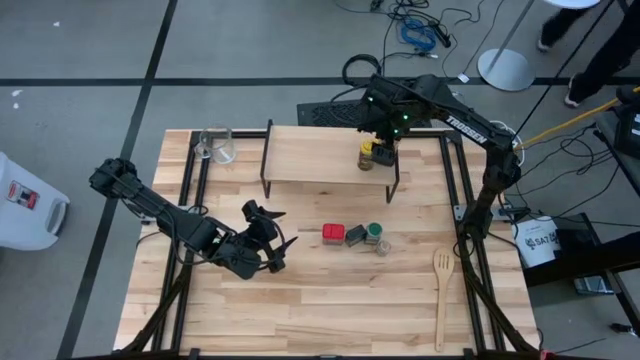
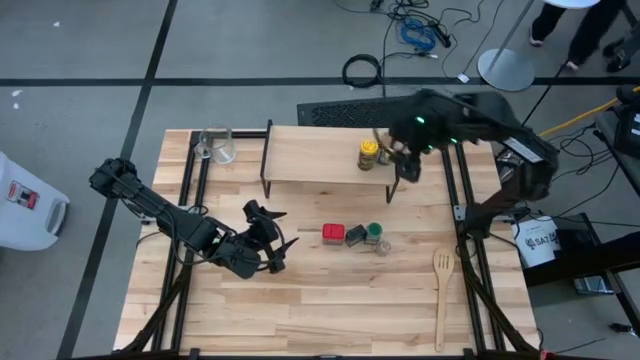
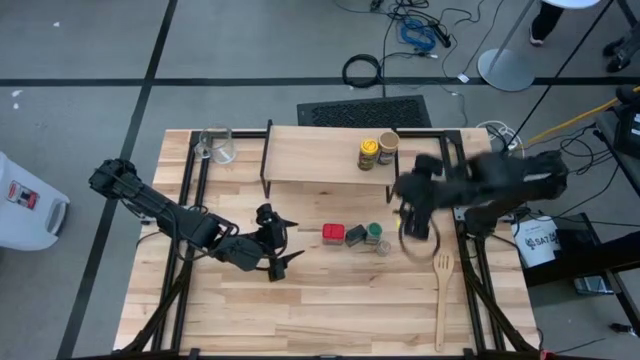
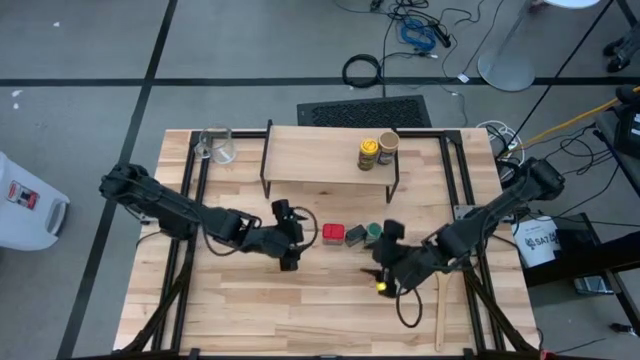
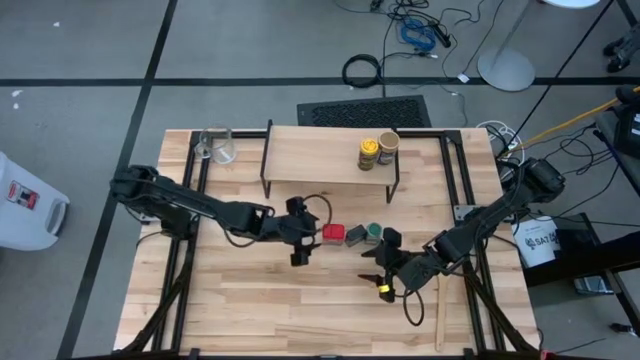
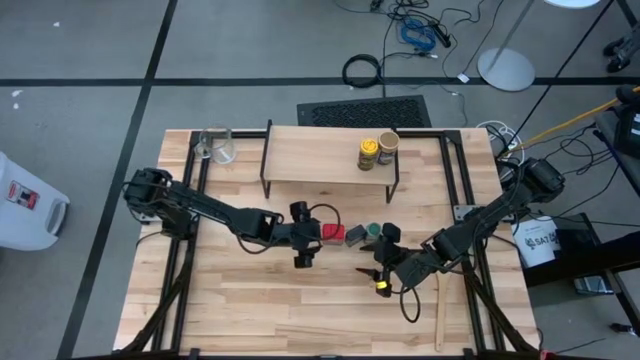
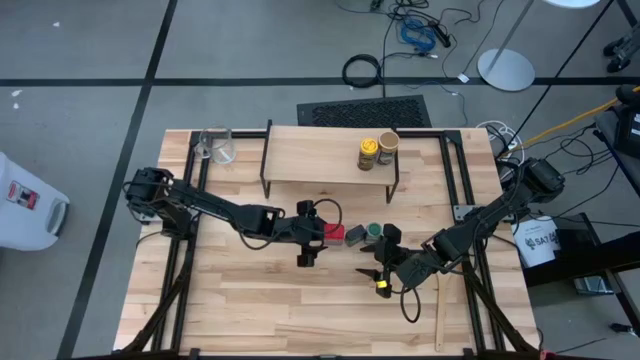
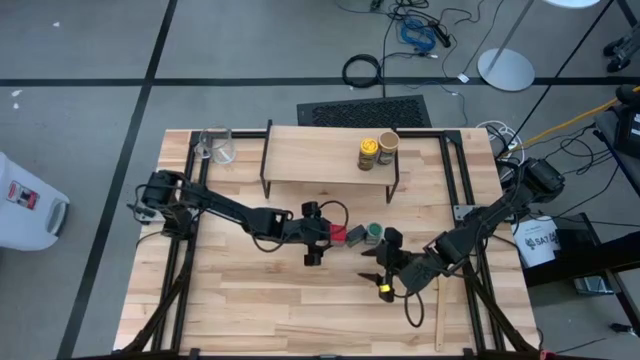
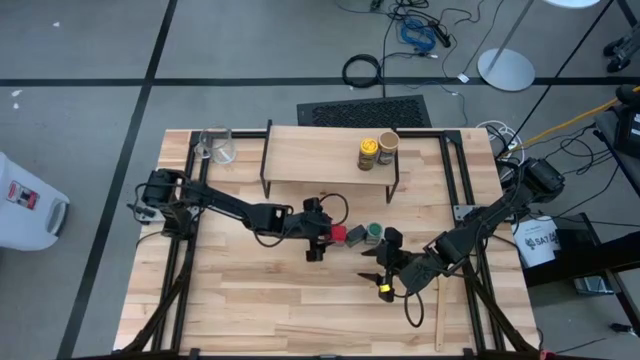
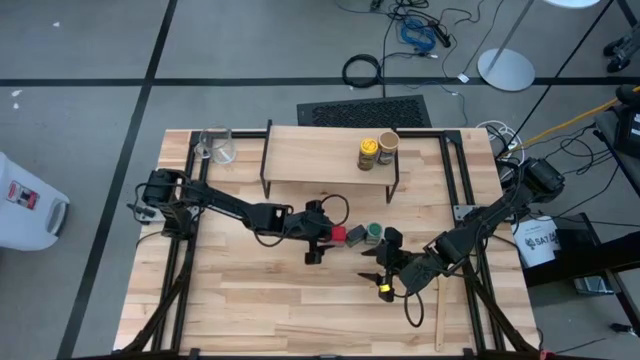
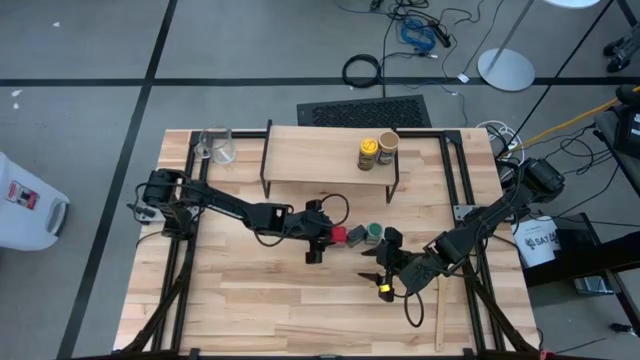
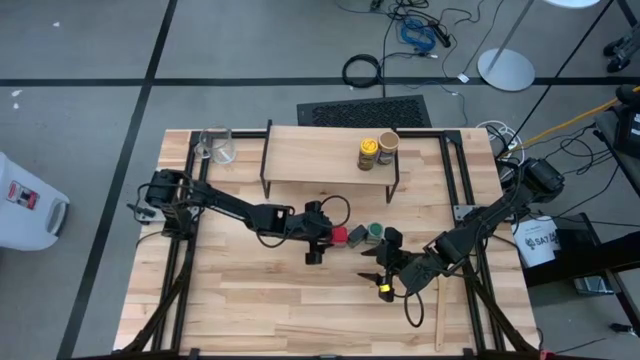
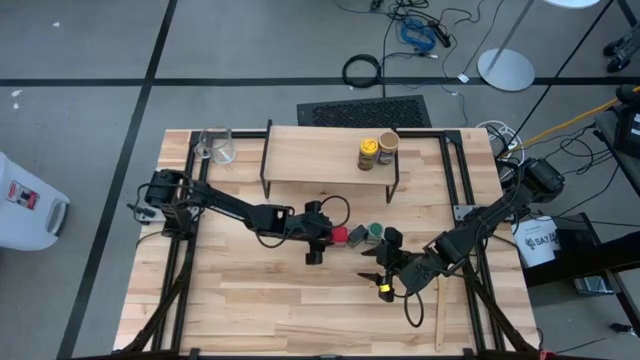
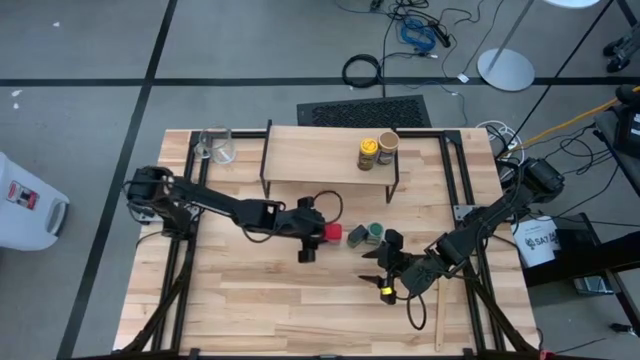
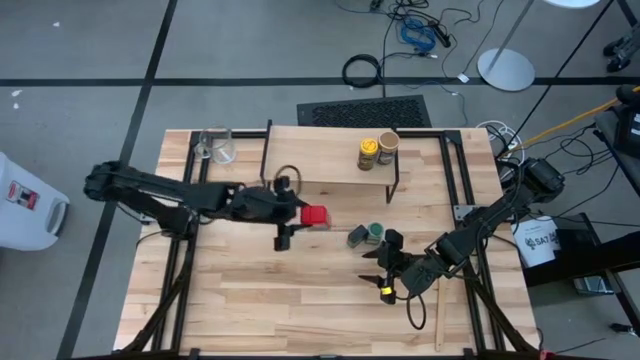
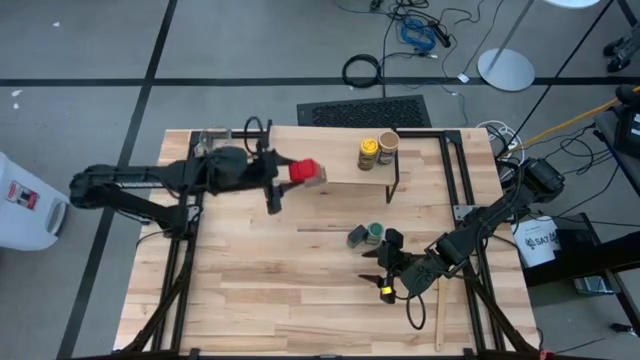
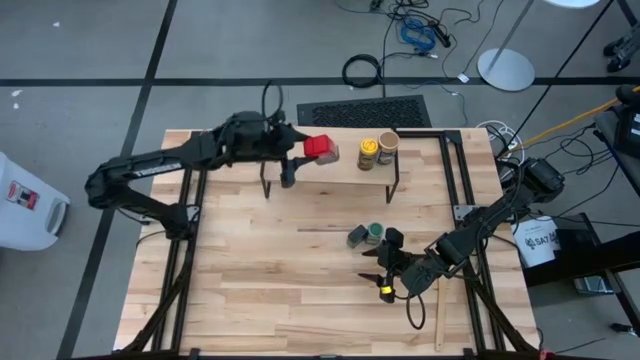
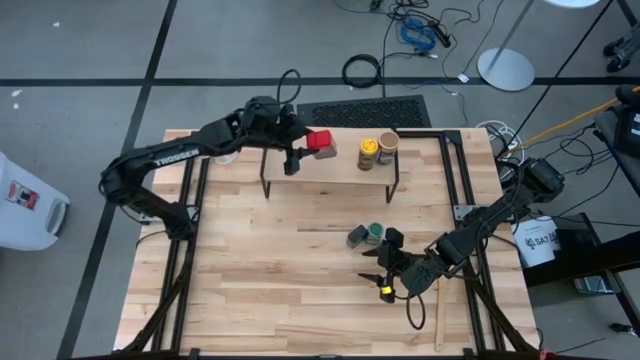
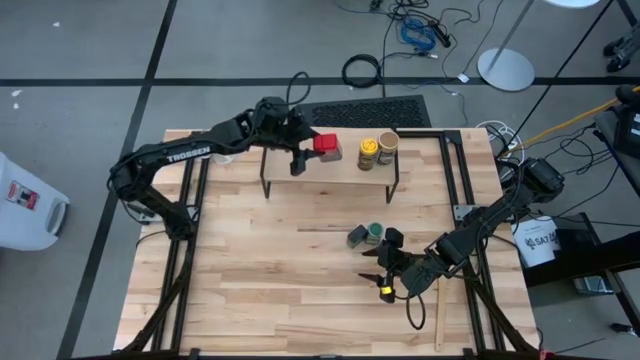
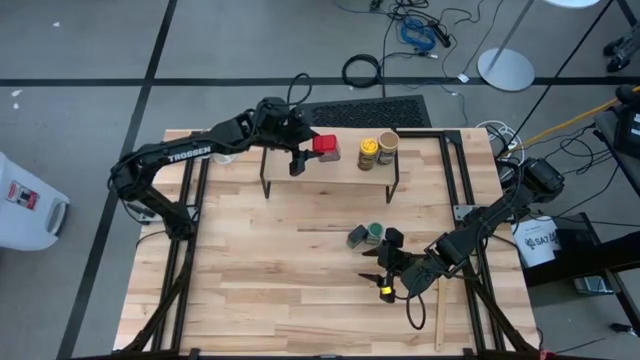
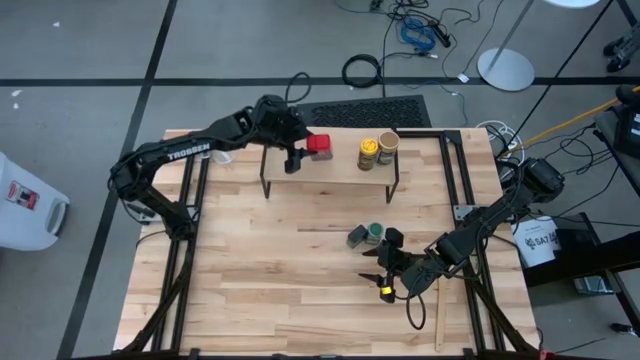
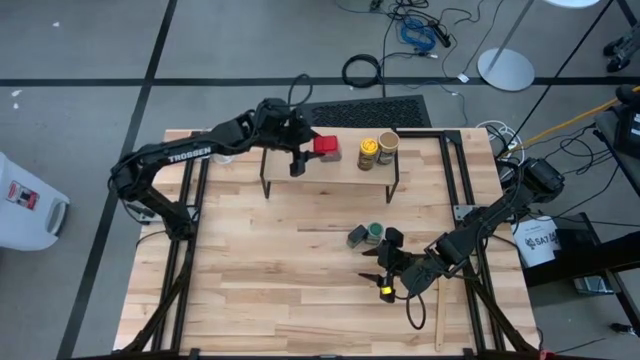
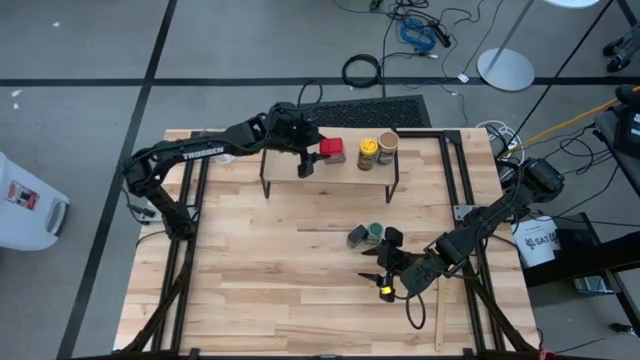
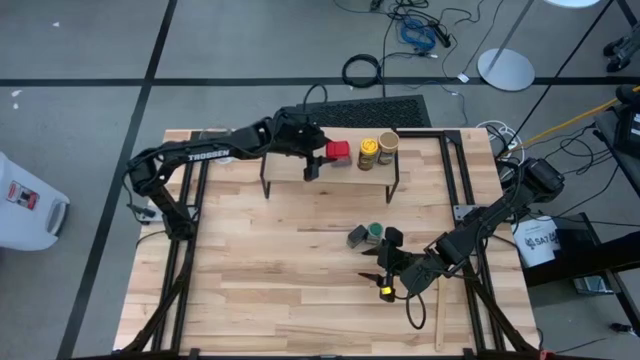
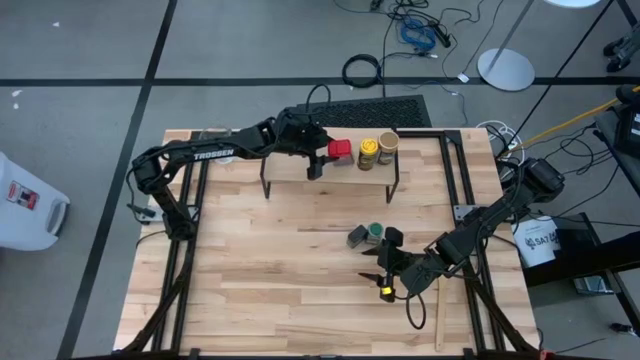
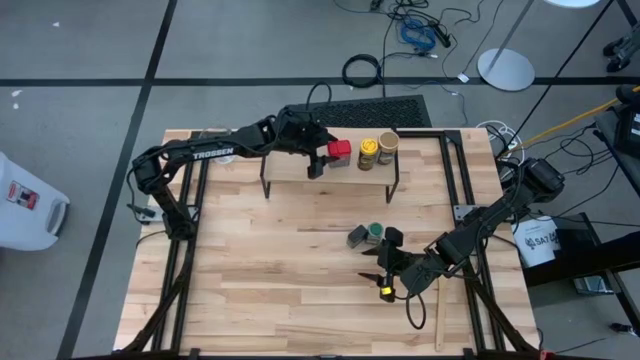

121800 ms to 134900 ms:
Task: Shelf spices
Put the red seasoning can on the shelf

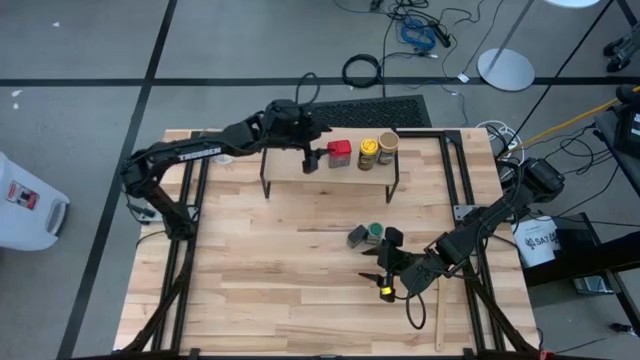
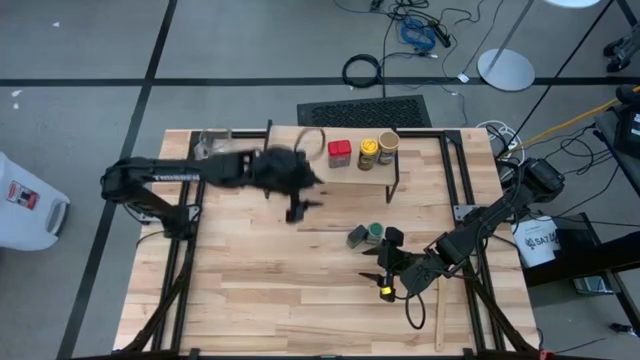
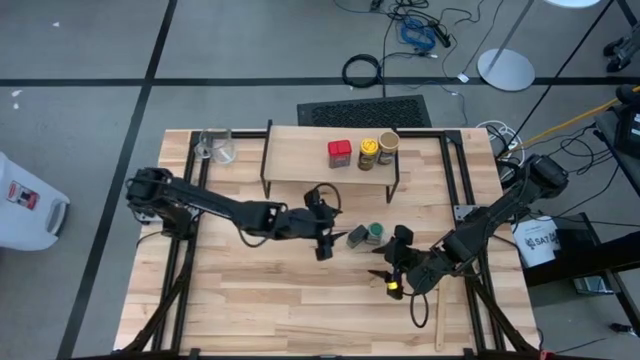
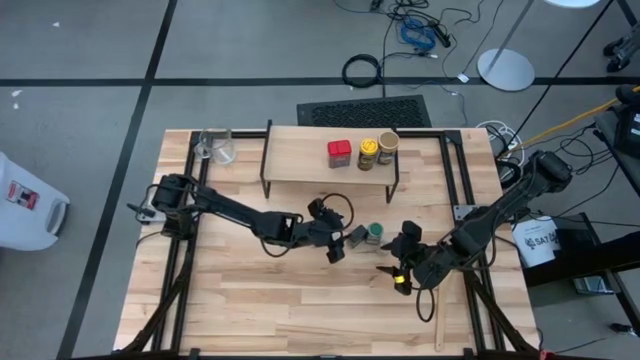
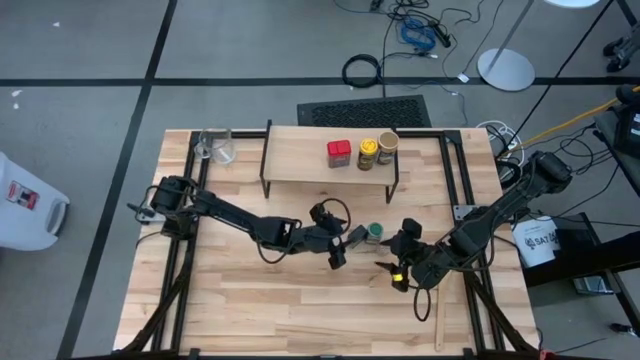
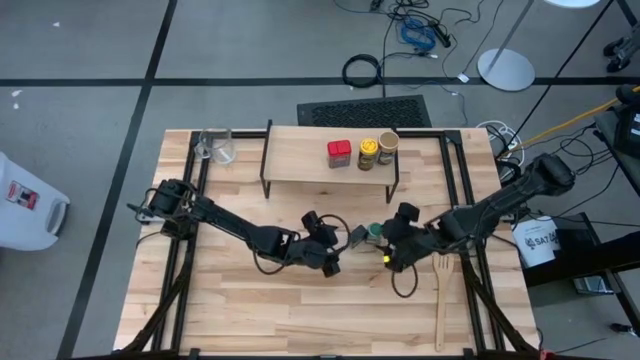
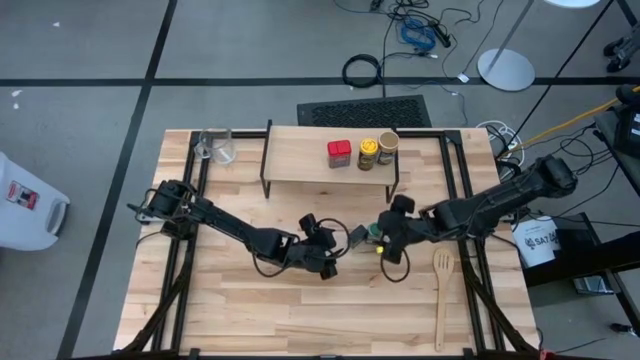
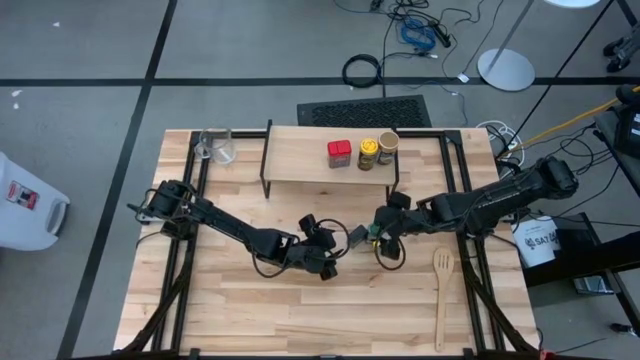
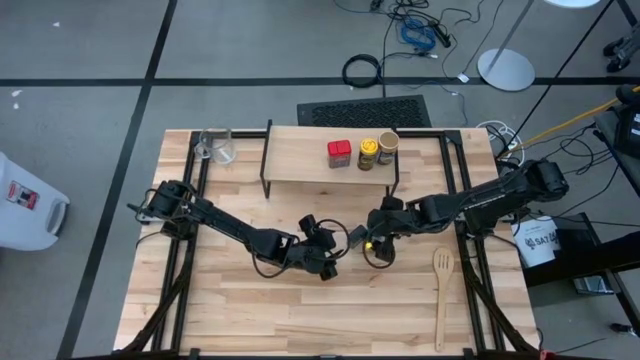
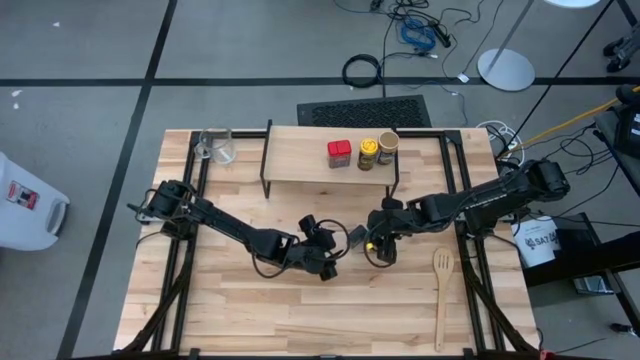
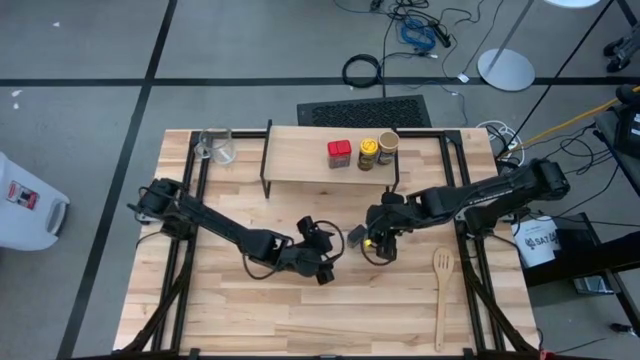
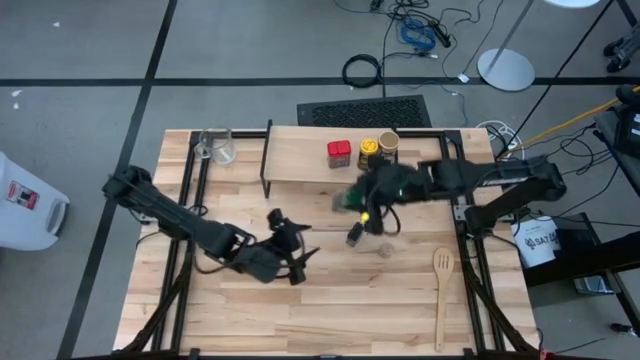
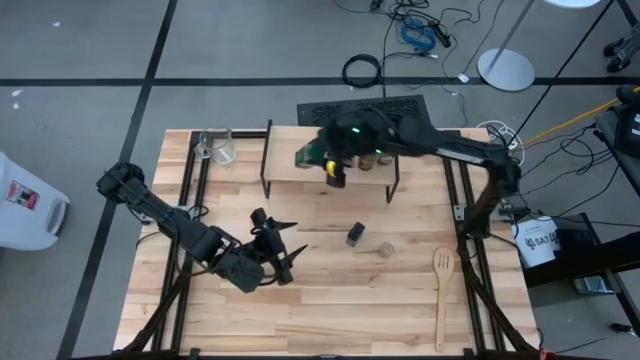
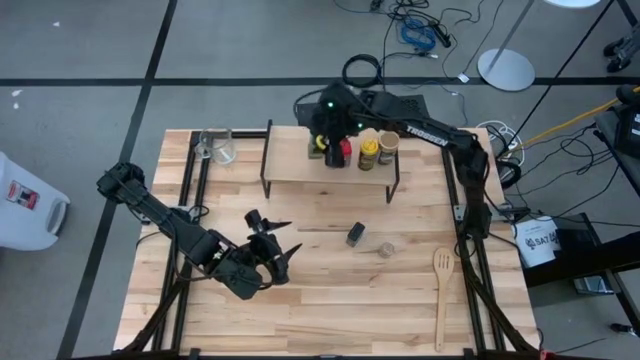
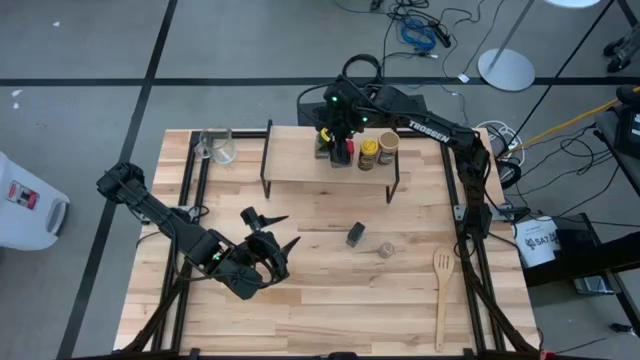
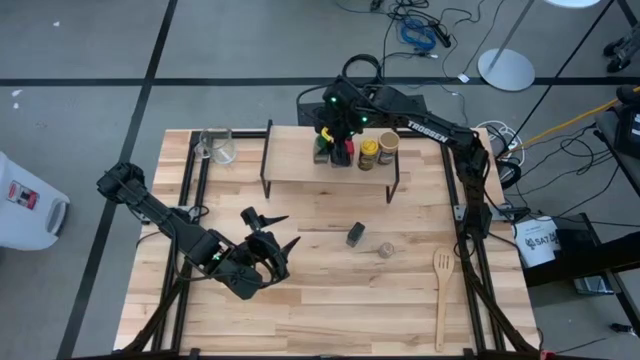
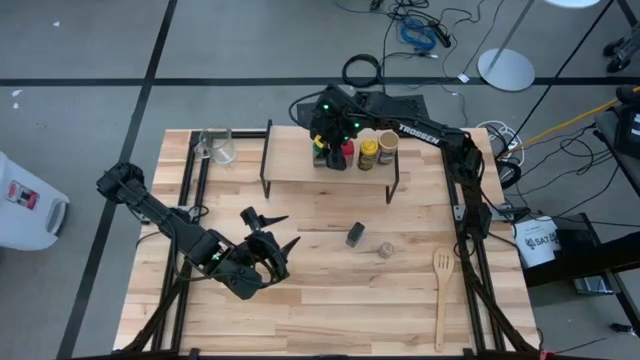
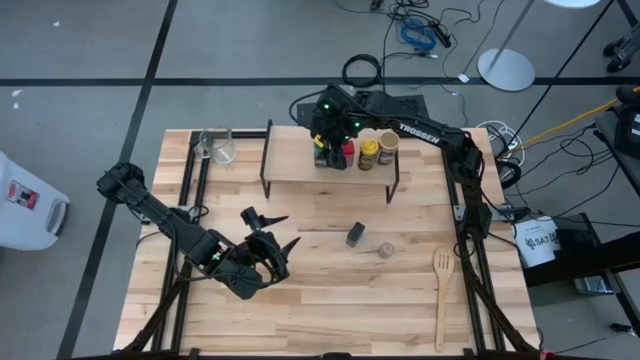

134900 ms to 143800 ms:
Put the green seasoning bottle on the shelf
